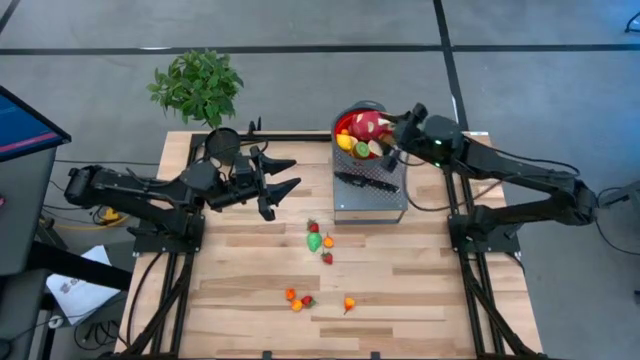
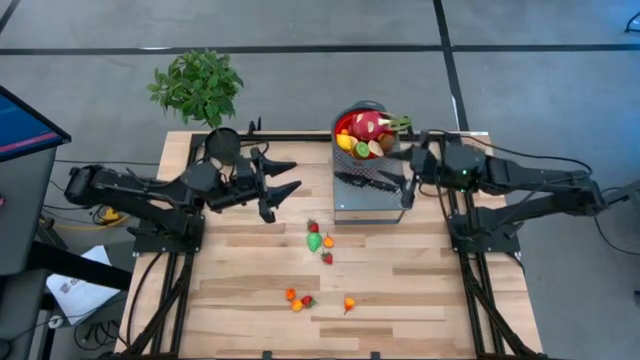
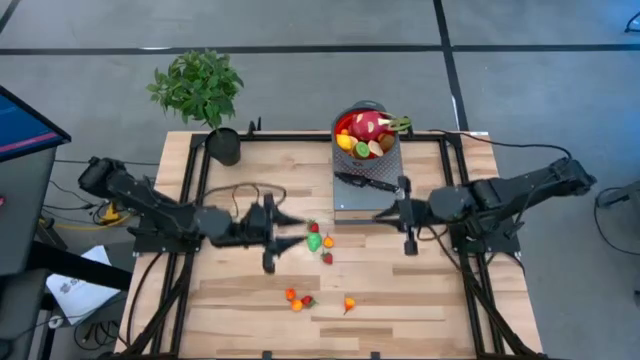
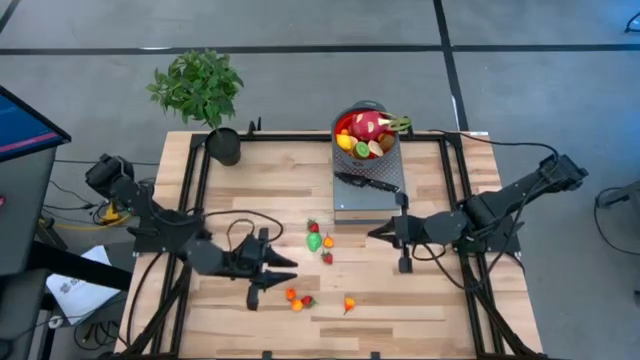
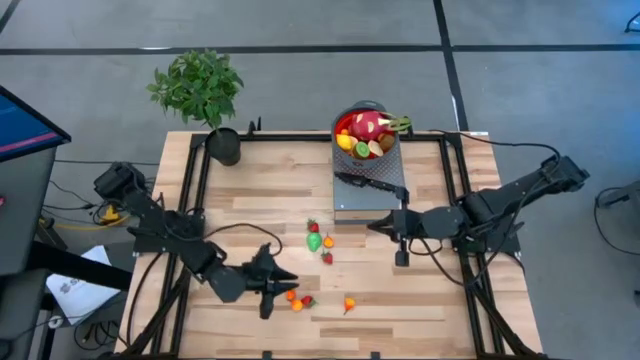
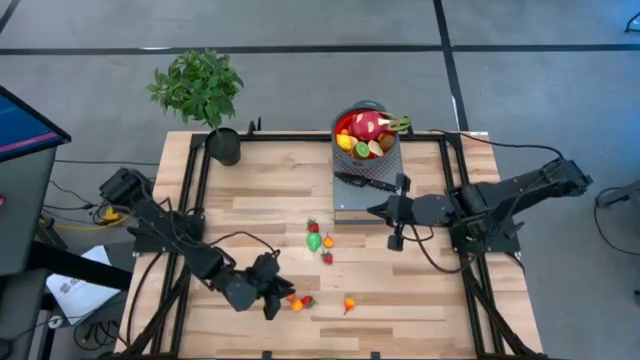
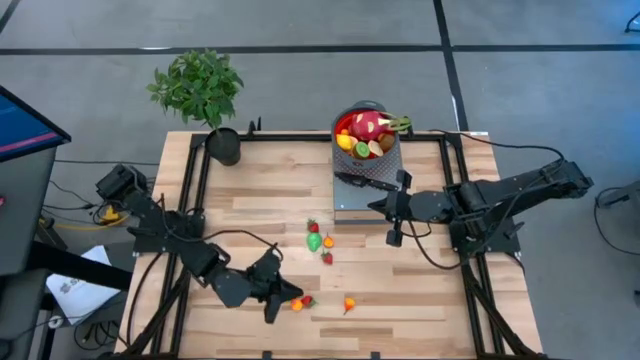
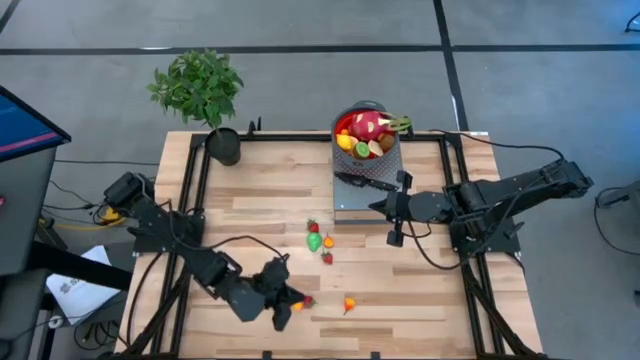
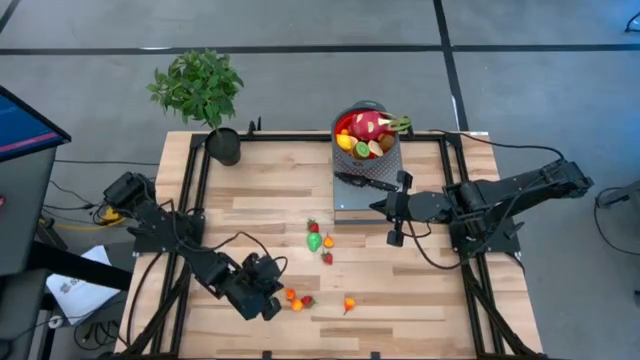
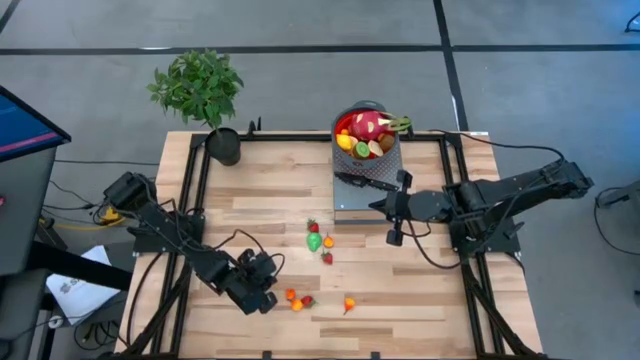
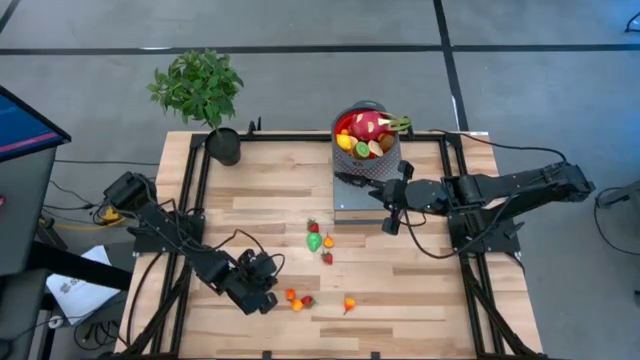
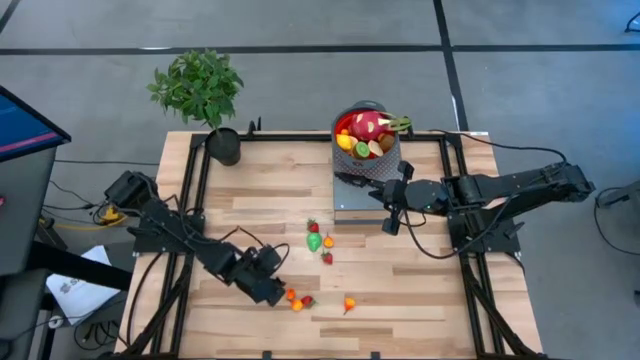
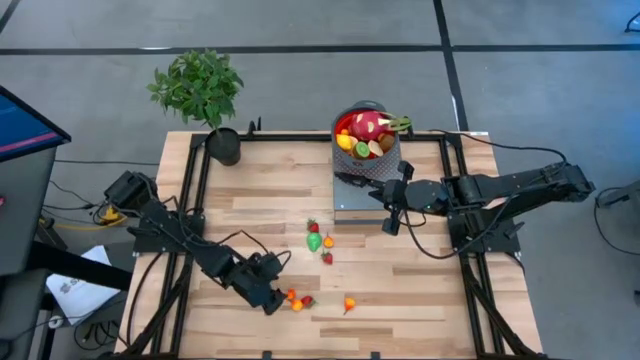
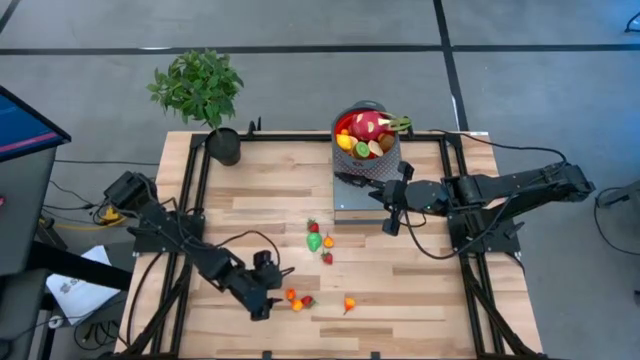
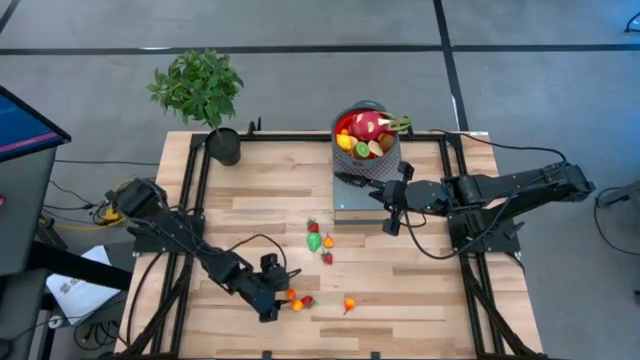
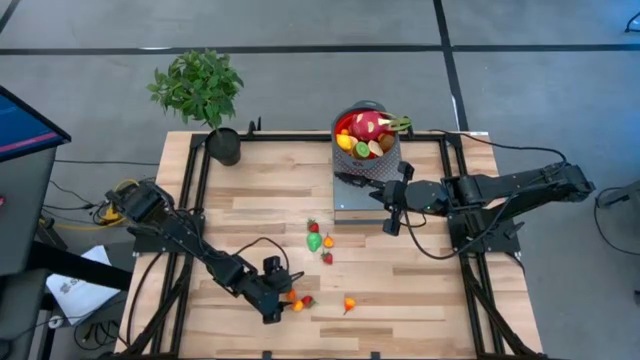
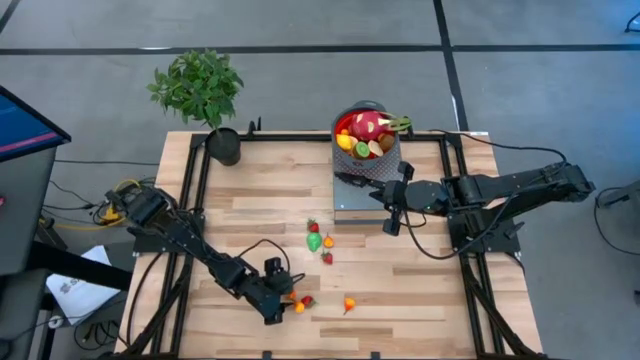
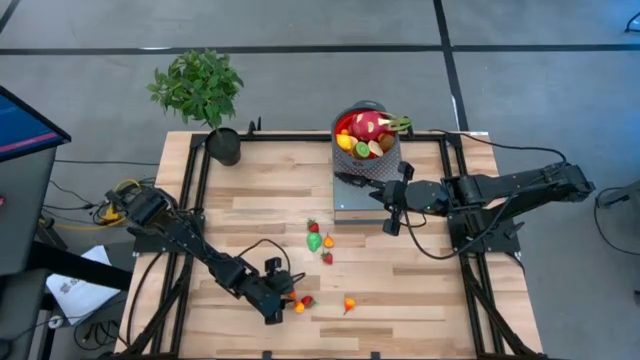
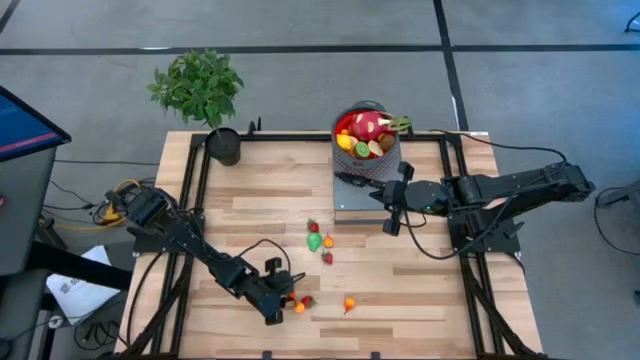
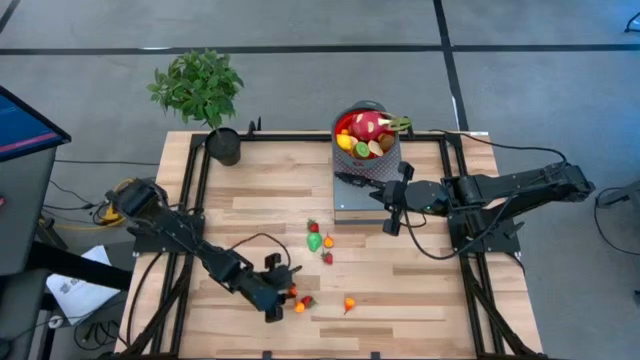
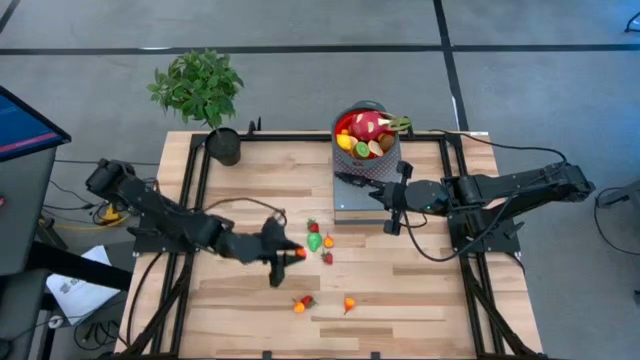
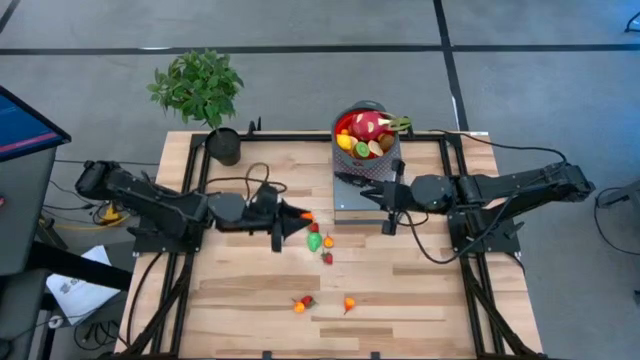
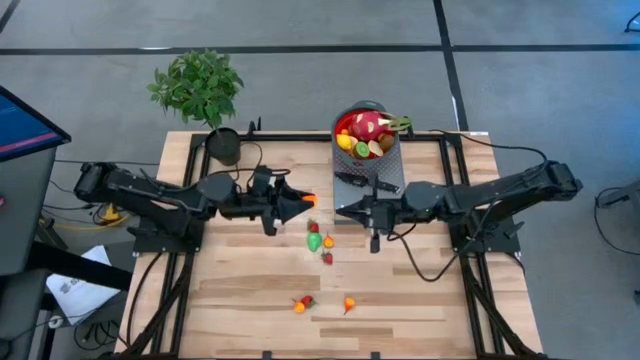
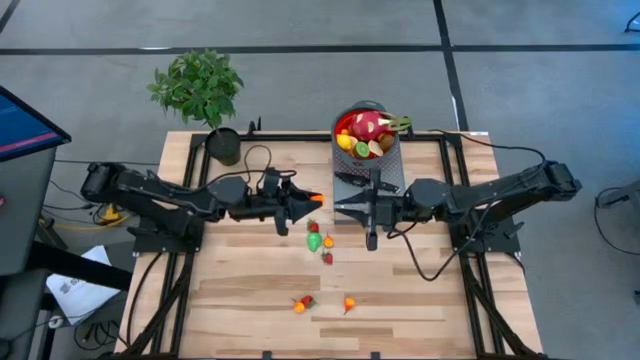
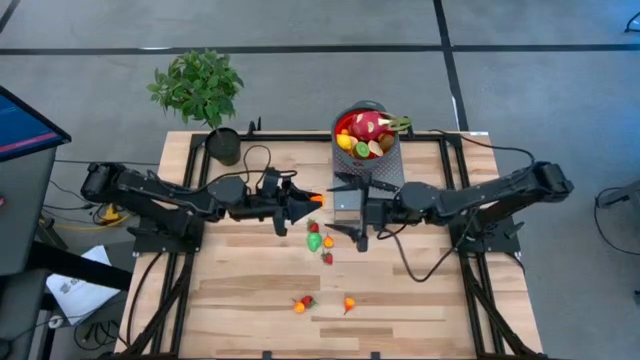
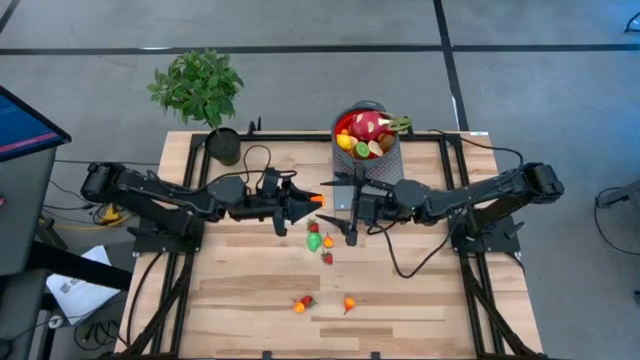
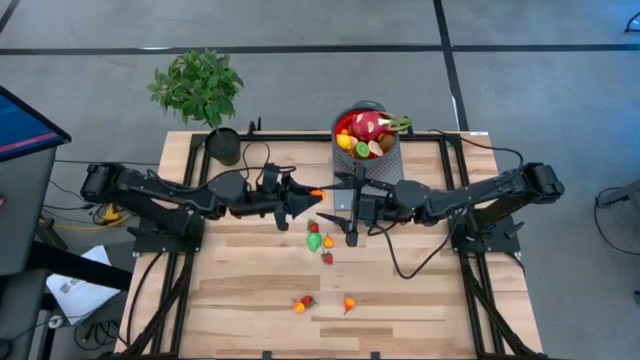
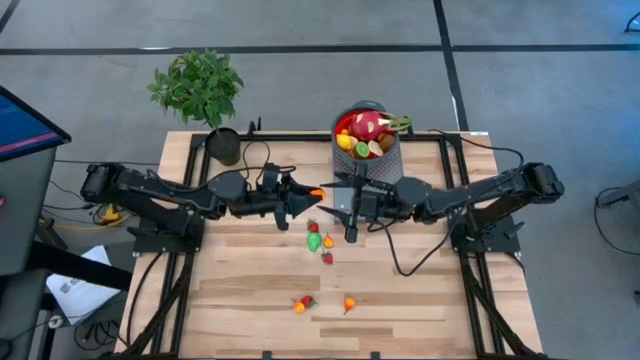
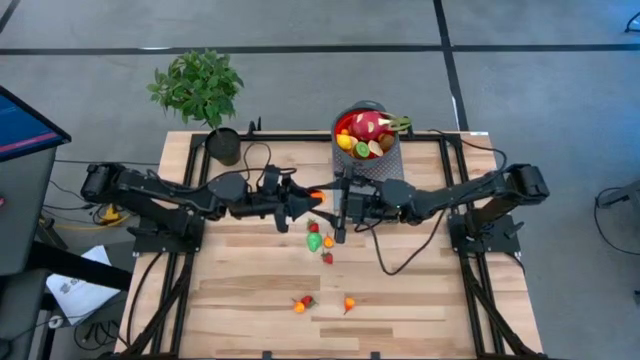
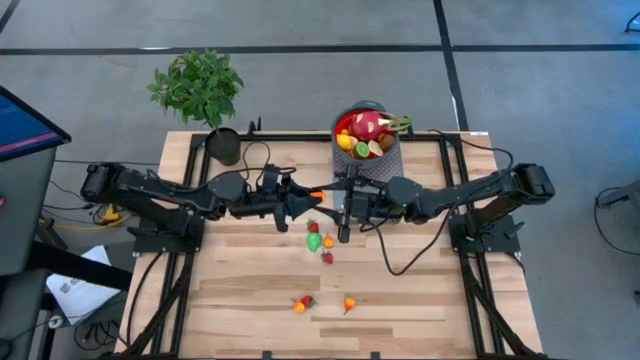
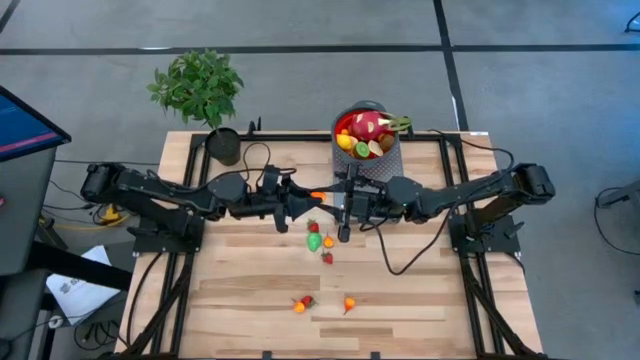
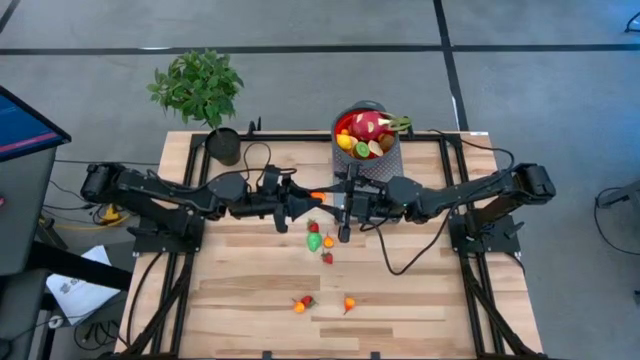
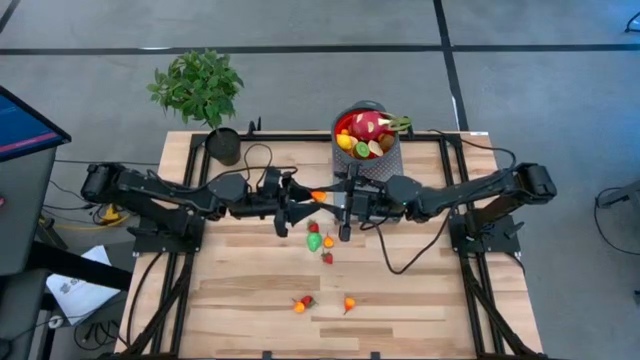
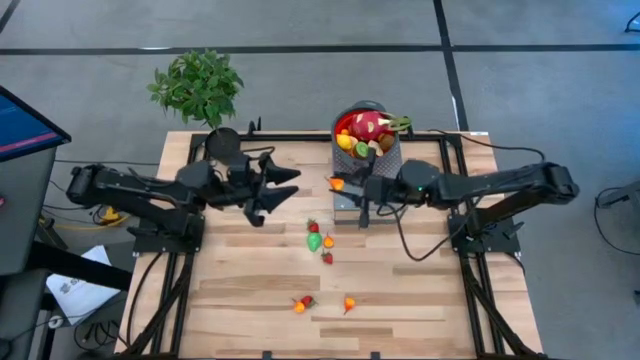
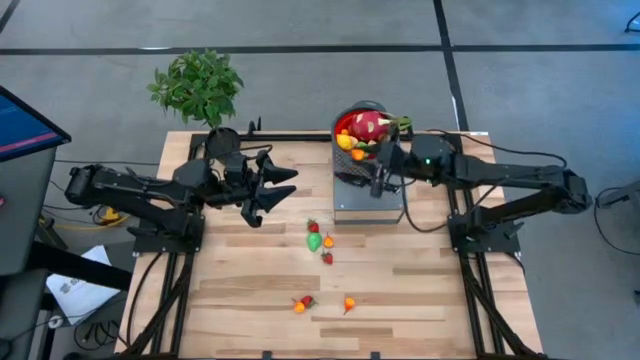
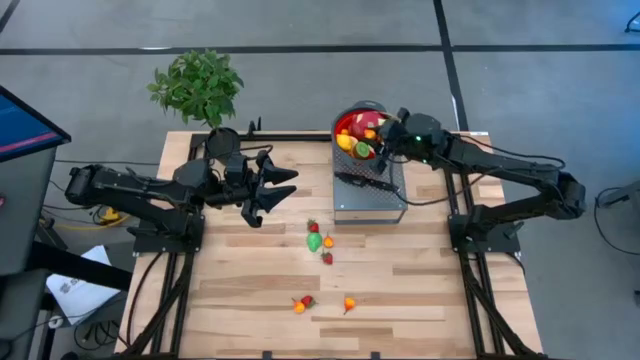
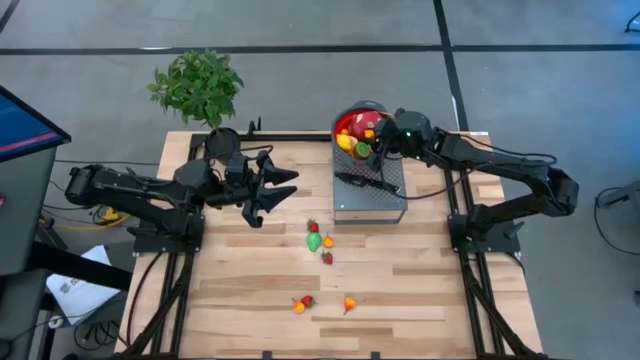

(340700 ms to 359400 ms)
Task: Pick & Place Fruit
Put the yellow pear into the red colander on the shelf

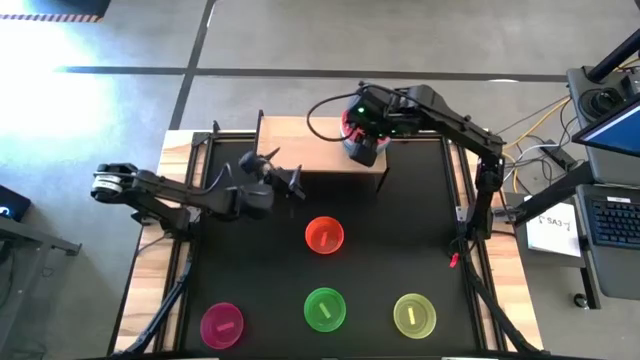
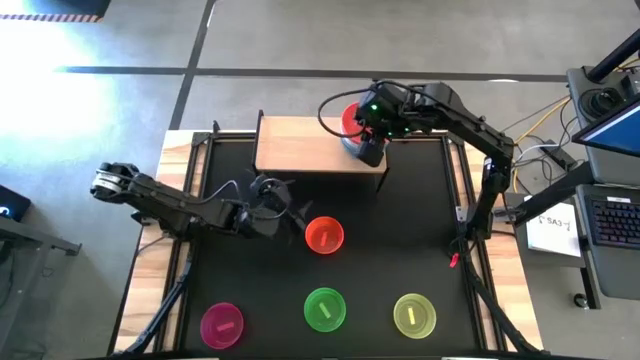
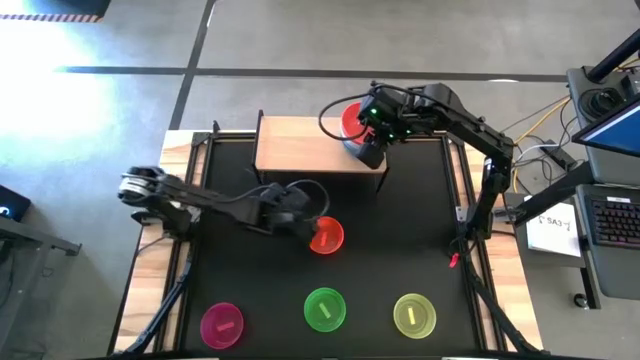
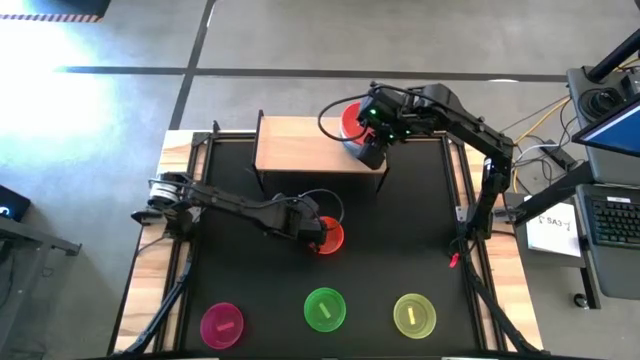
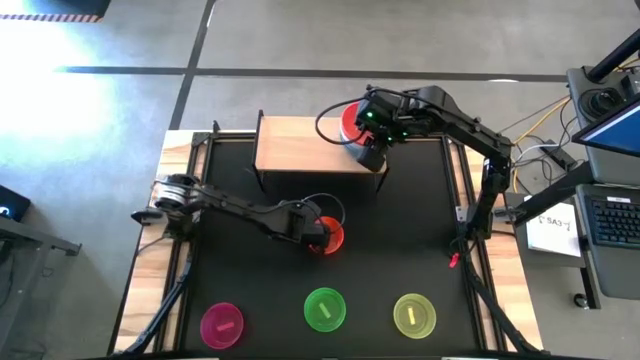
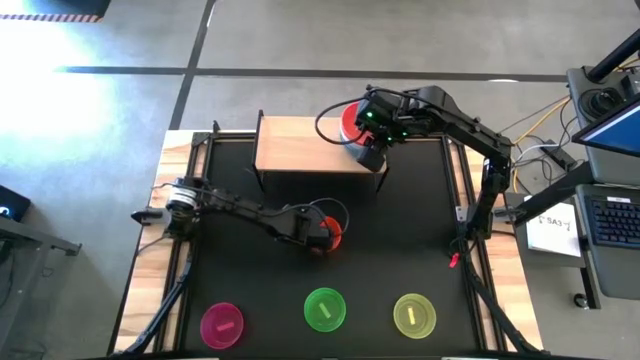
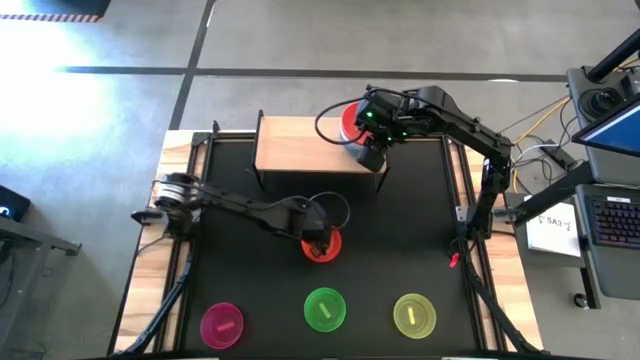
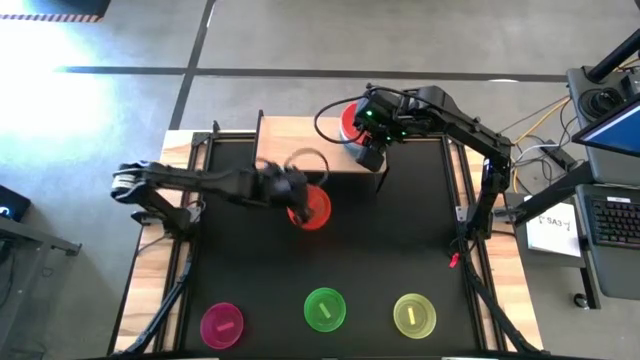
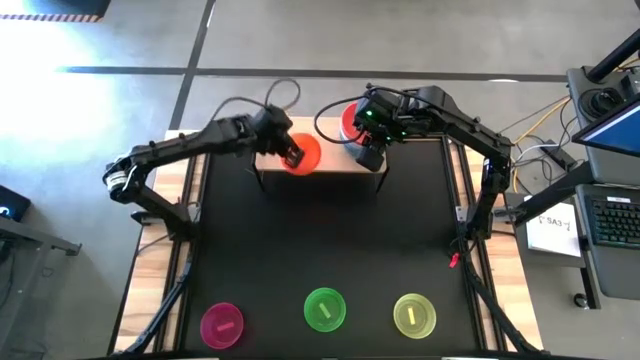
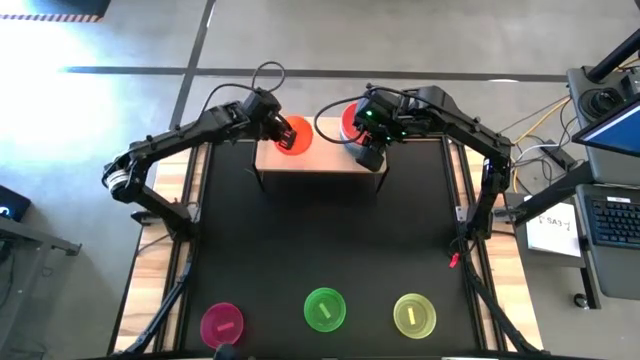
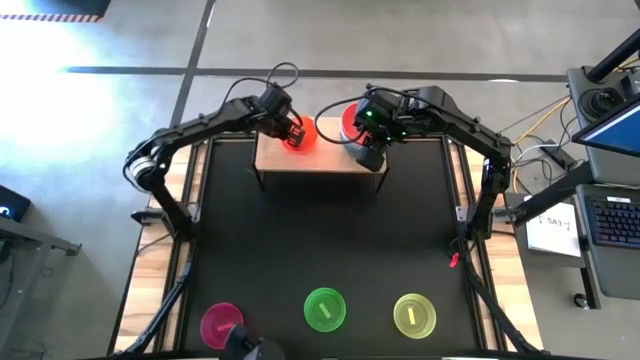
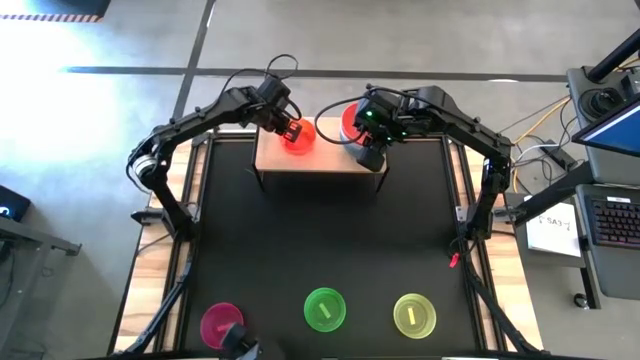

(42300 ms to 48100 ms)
Task: Place and stack bowls onto a shelf
Put the light orange bowl on the shelf
